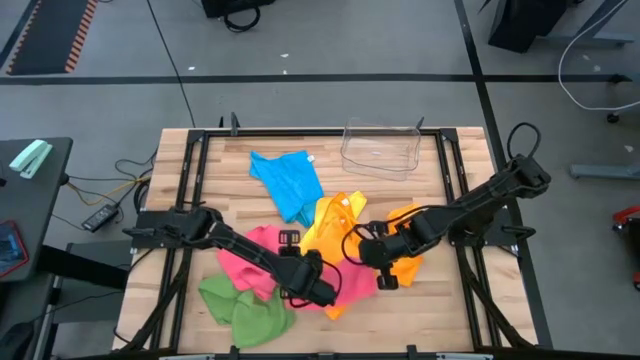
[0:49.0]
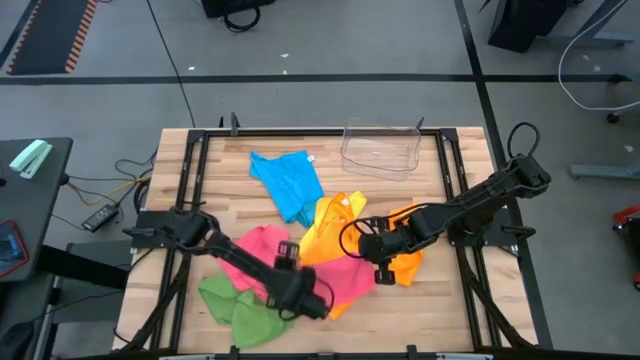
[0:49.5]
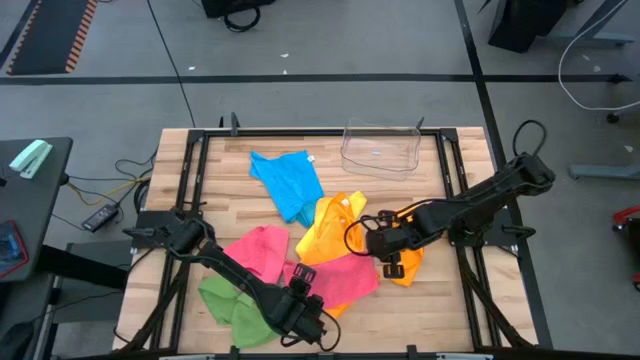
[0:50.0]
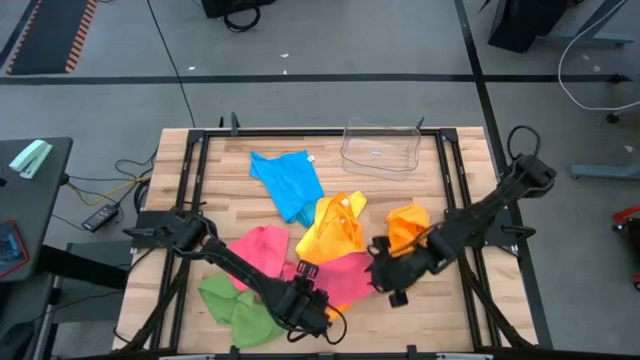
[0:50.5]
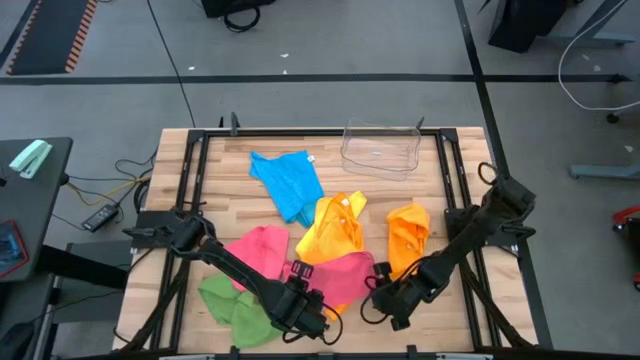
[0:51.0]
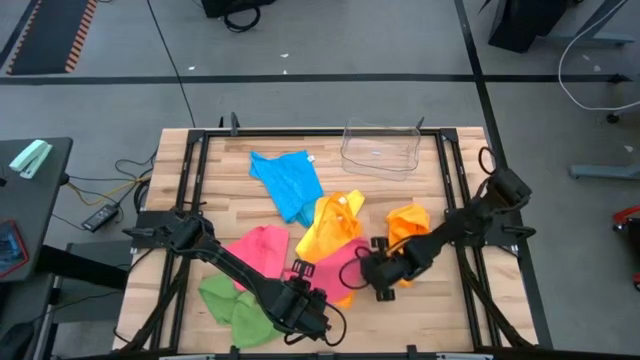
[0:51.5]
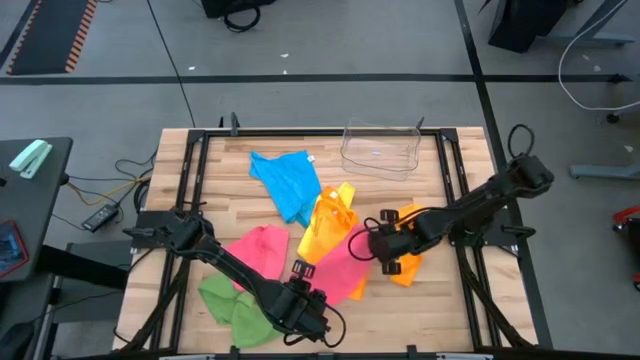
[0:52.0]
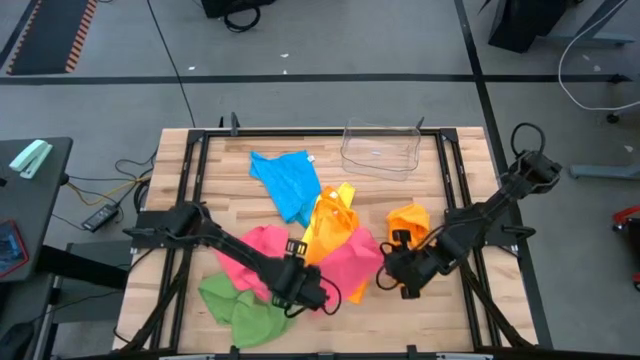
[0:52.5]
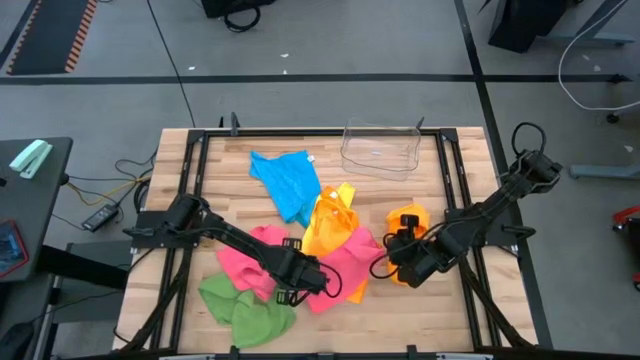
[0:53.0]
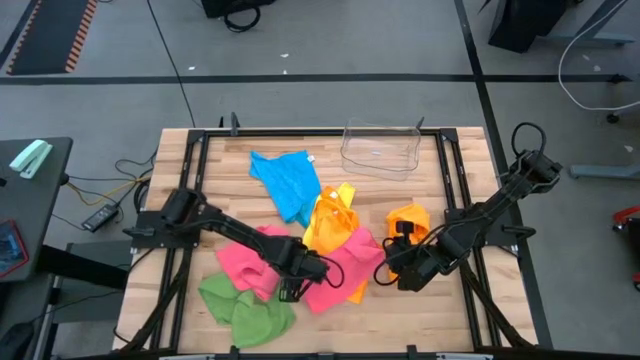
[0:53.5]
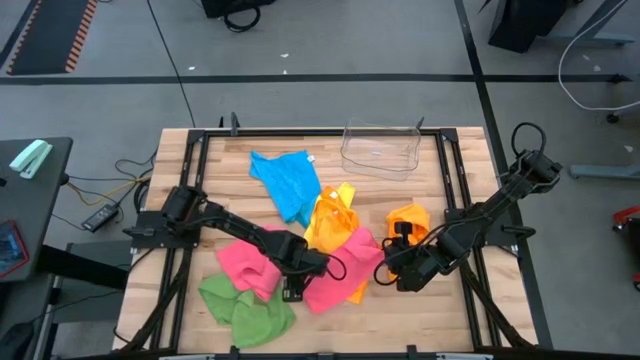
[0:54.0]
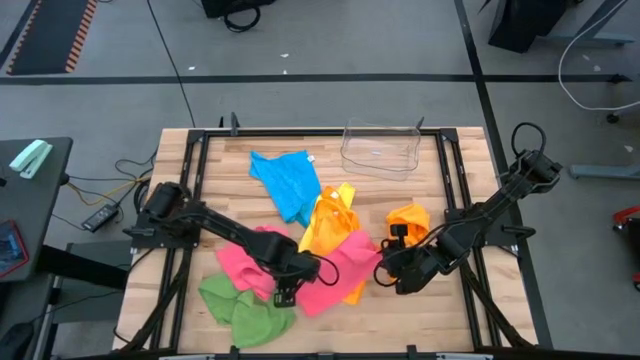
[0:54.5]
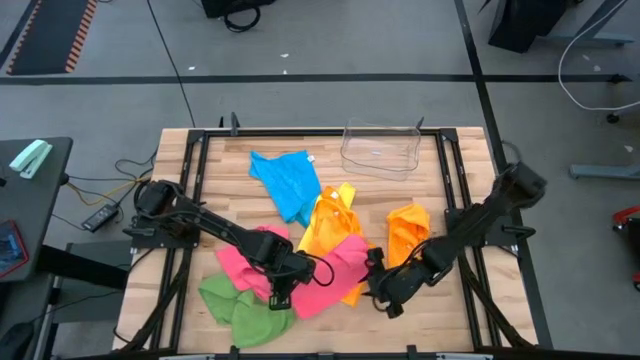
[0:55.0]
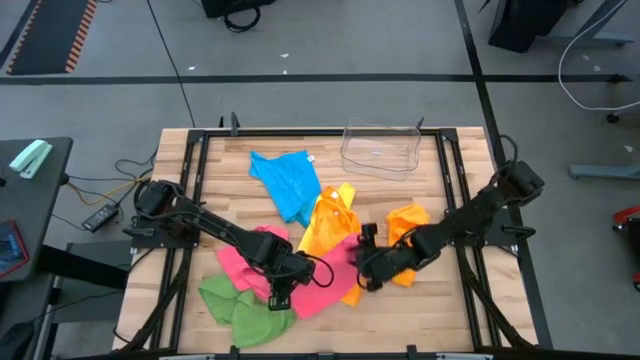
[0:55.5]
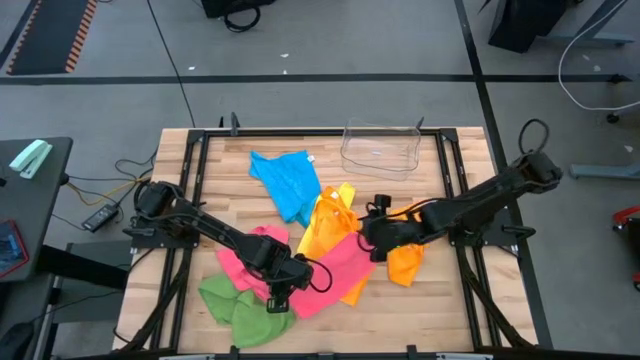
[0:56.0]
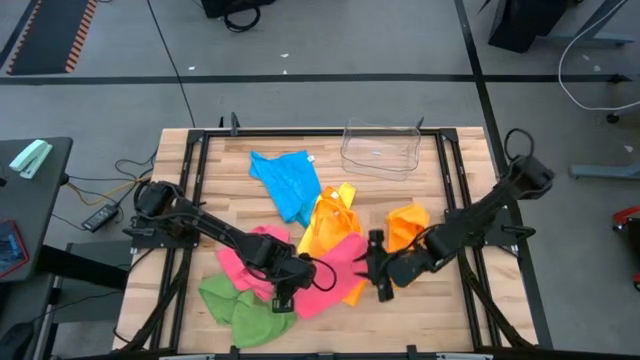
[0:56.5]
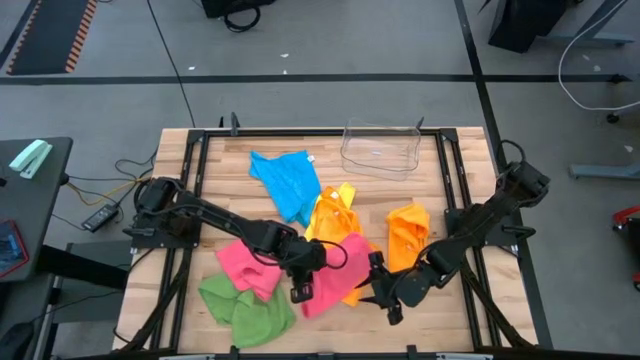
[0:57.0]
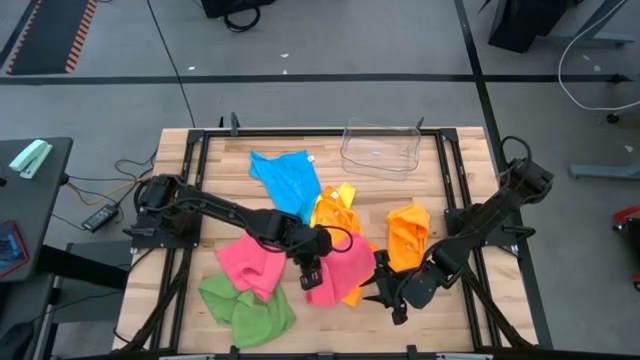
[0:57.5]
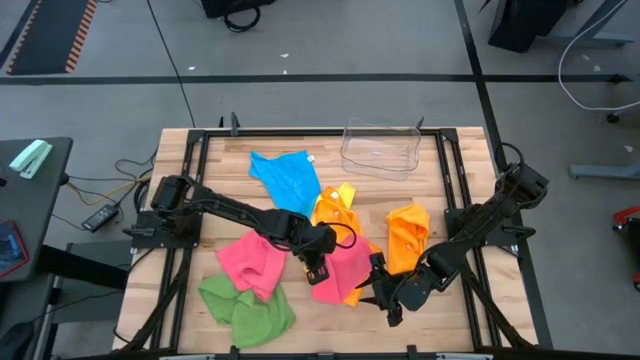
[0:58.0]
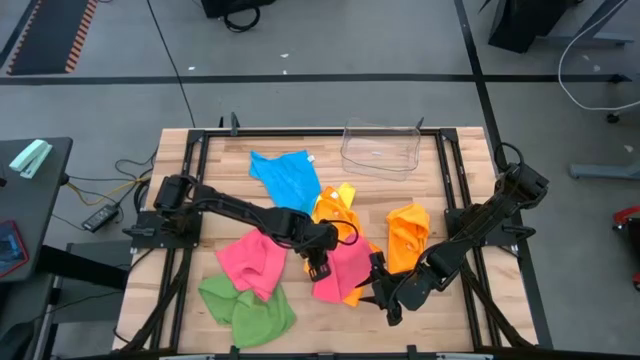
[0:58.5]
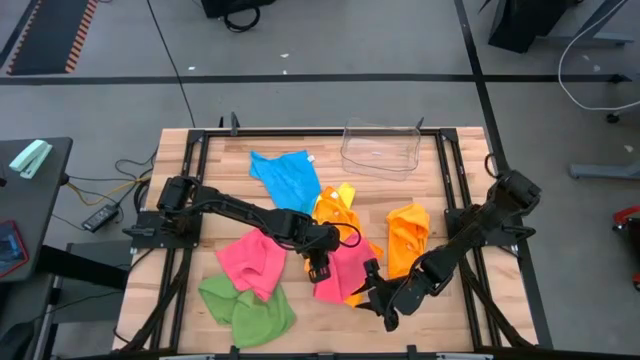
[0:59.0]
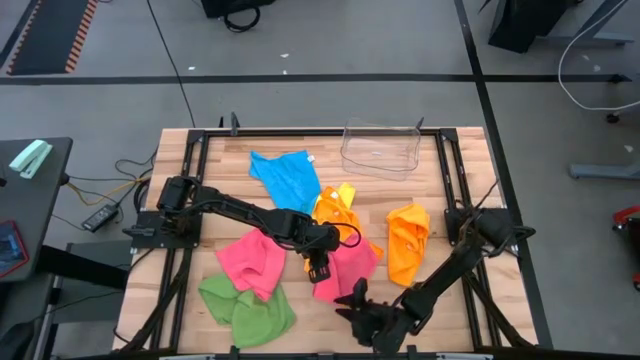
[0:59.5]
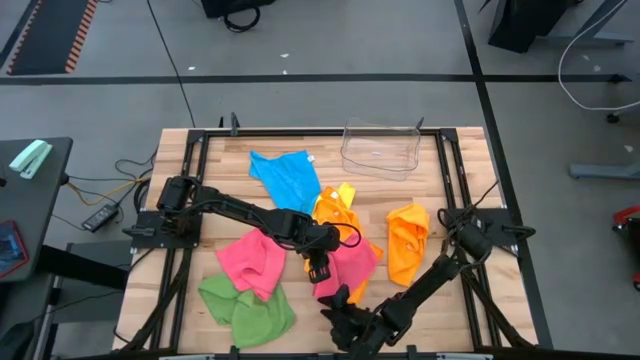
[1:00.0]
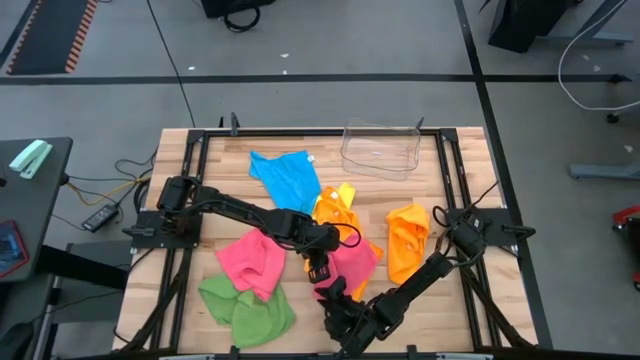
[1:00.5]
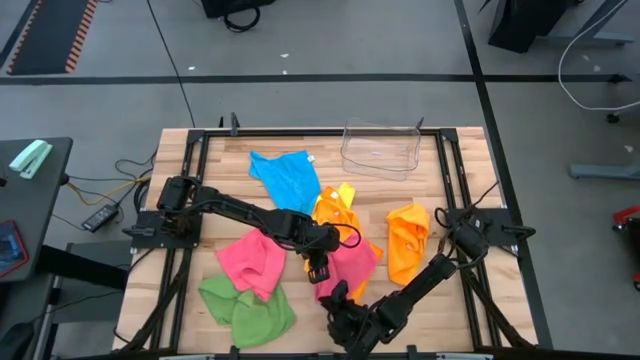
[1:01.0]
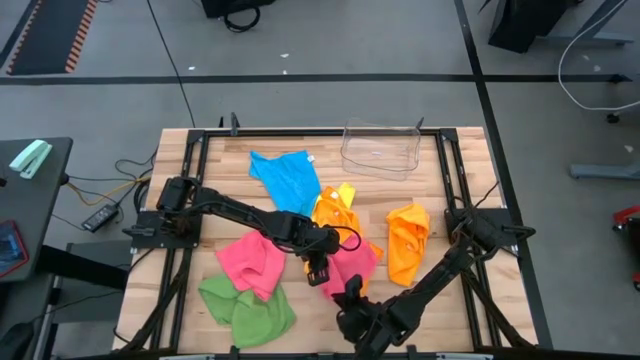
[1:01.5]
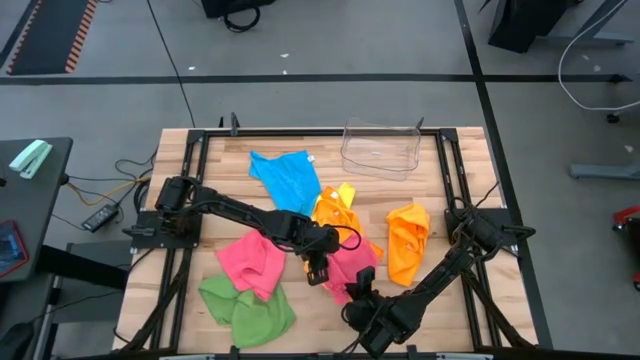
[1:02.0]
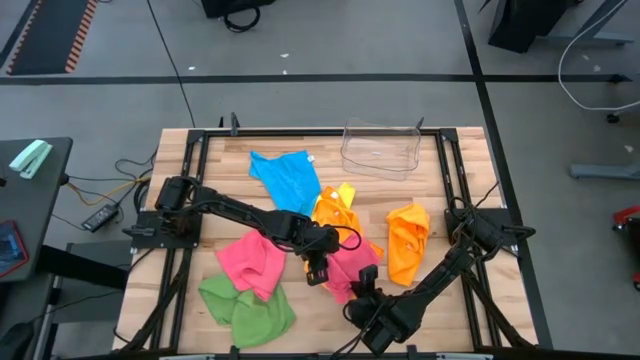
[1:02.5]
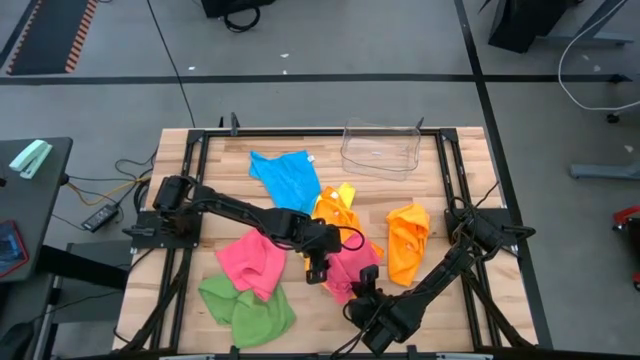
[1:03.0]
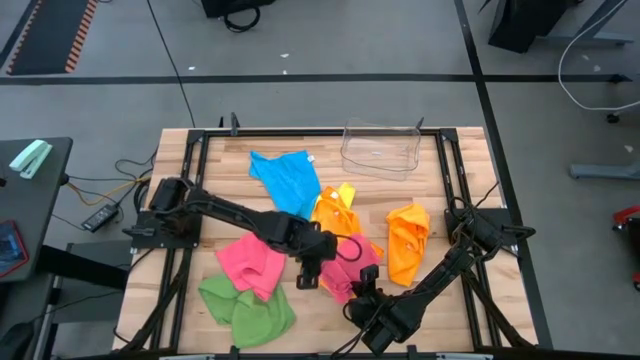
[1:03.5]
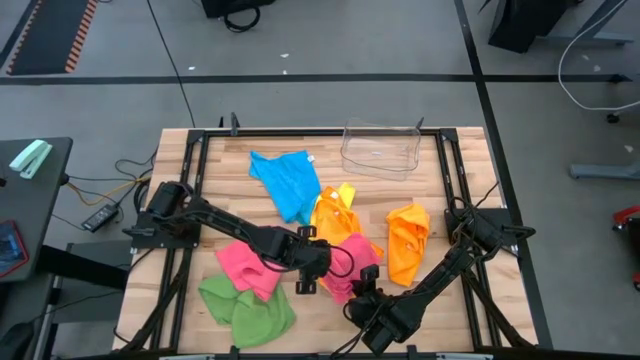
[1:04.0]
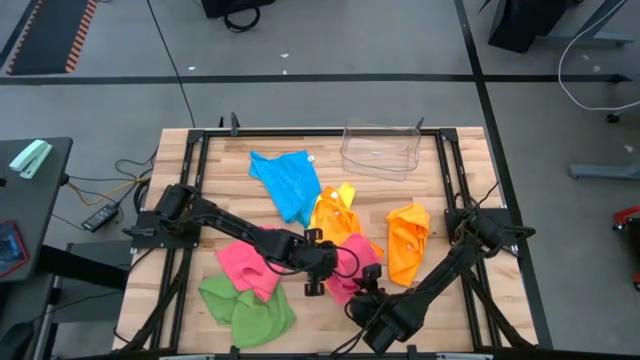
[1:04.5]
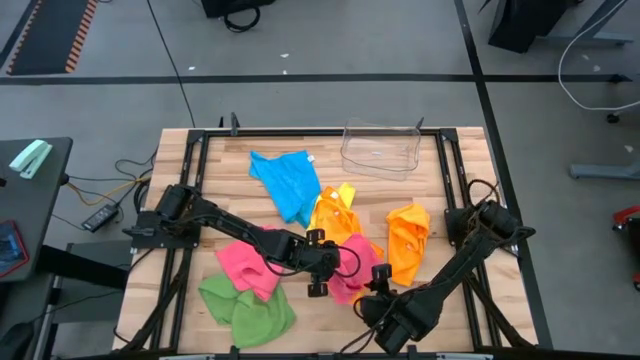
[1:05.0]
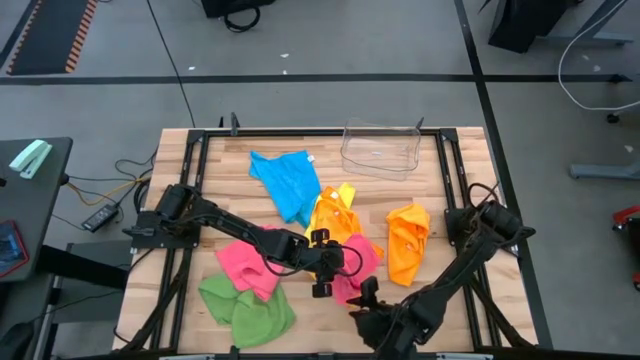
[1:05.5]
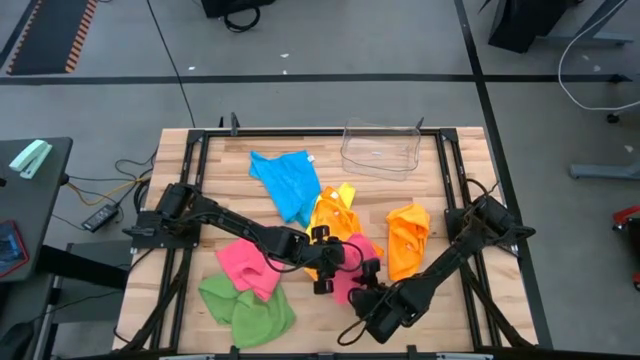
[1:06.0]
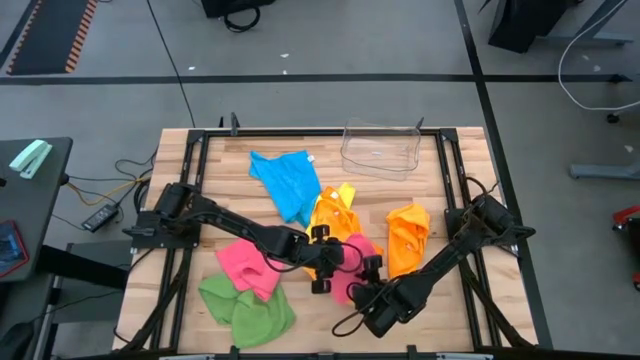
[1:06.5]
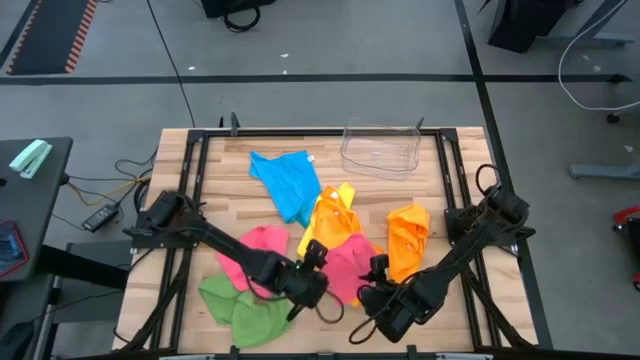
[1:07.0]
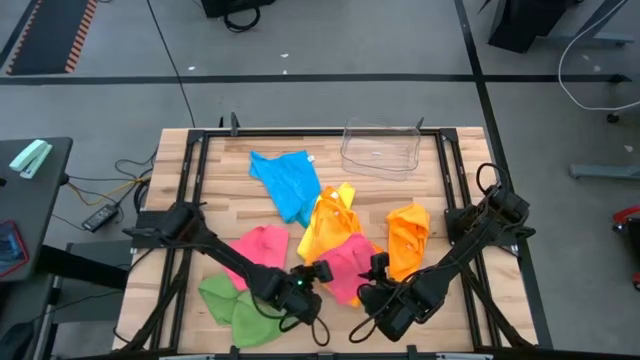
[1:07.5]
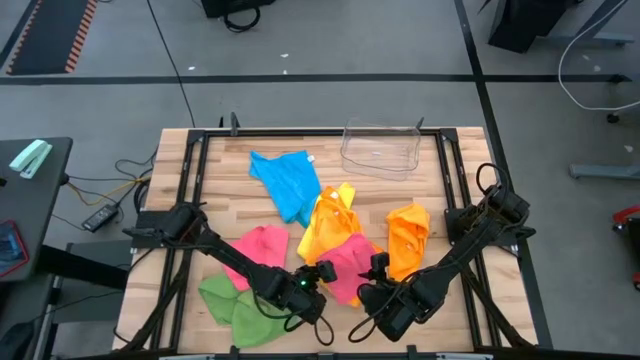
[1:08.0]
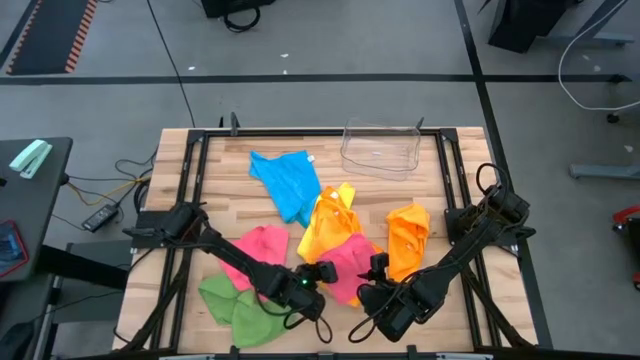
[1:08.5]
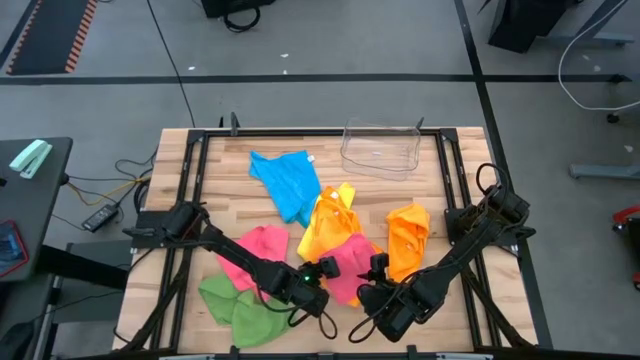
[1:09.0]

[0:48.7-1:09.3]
Task: Fold microfiber towels
Fold the top pink microfiber cloth
